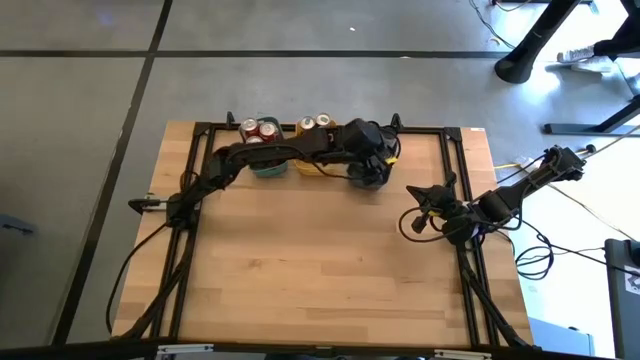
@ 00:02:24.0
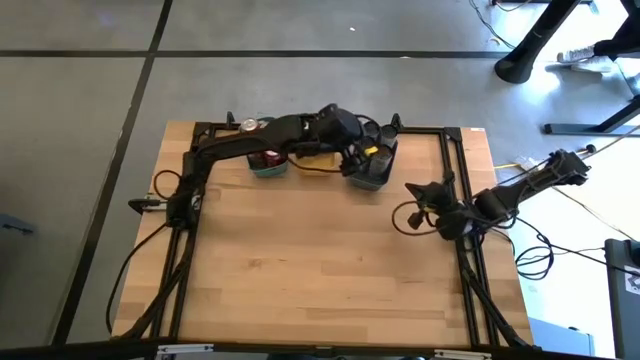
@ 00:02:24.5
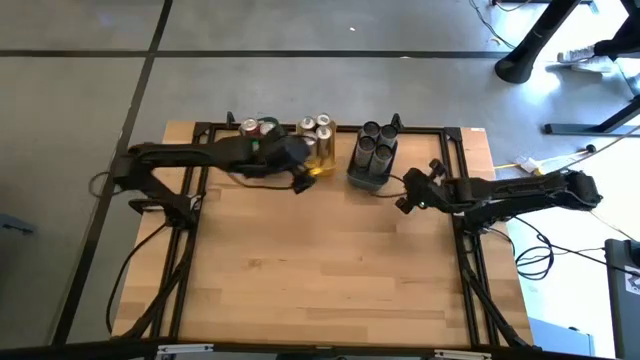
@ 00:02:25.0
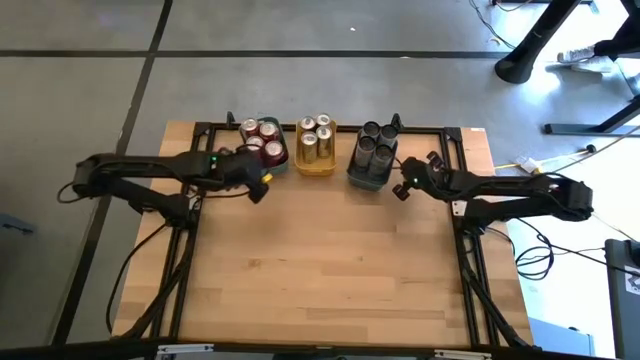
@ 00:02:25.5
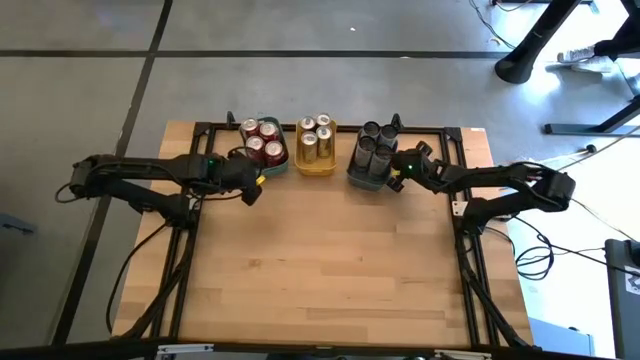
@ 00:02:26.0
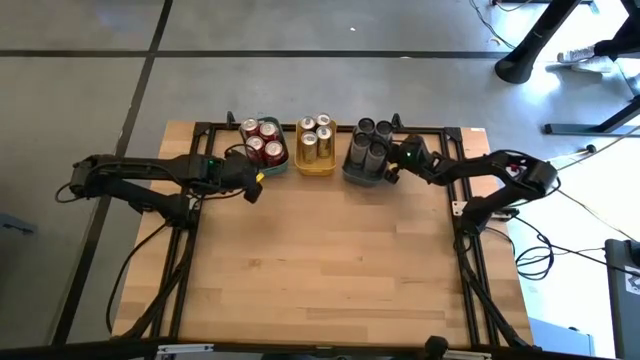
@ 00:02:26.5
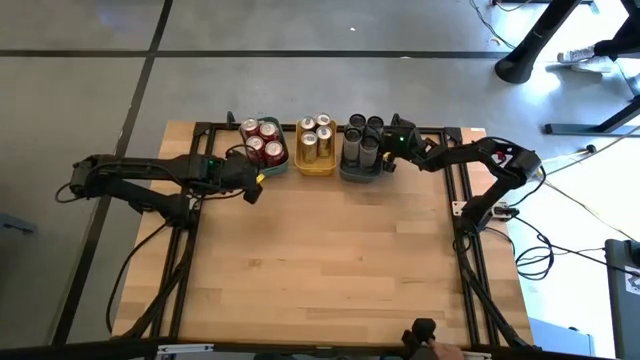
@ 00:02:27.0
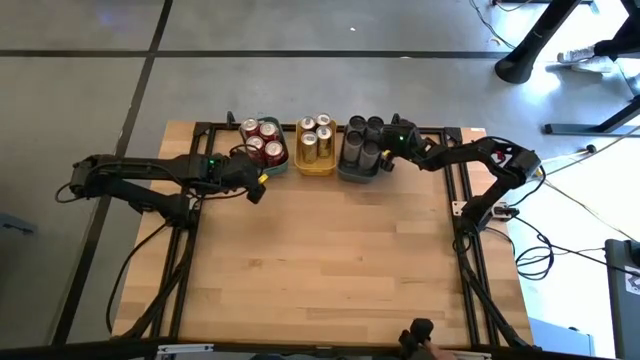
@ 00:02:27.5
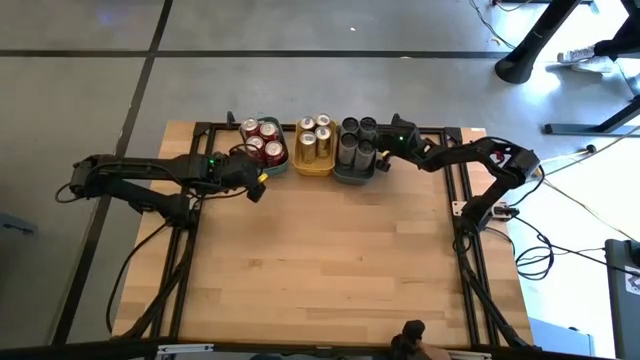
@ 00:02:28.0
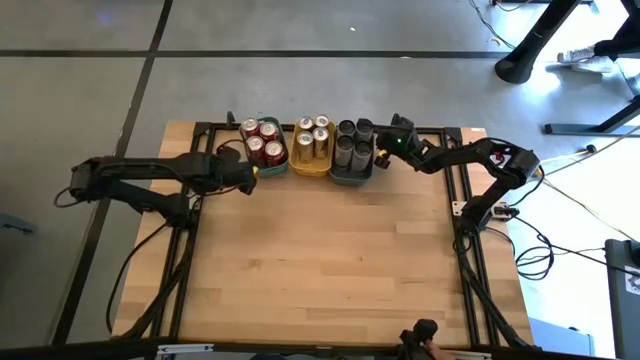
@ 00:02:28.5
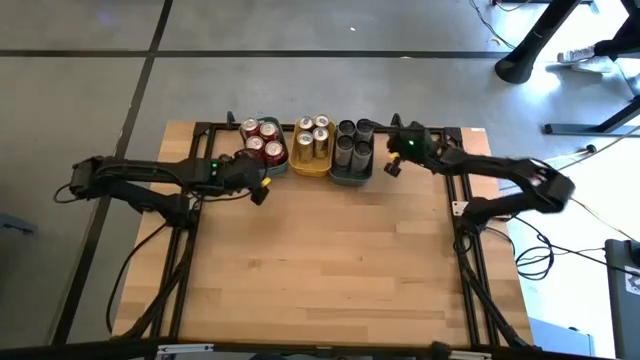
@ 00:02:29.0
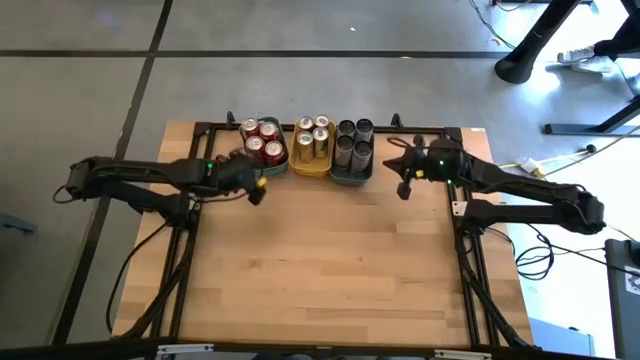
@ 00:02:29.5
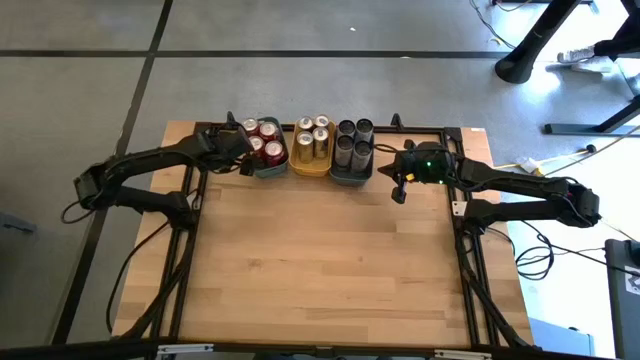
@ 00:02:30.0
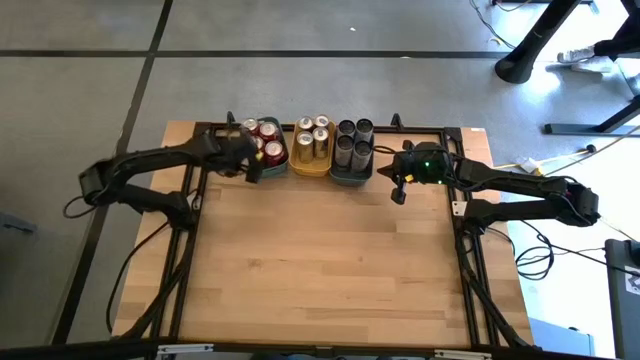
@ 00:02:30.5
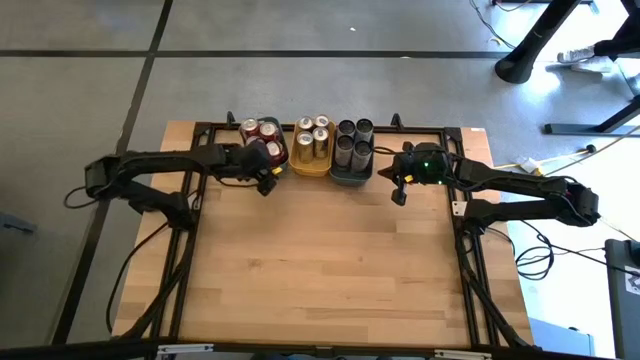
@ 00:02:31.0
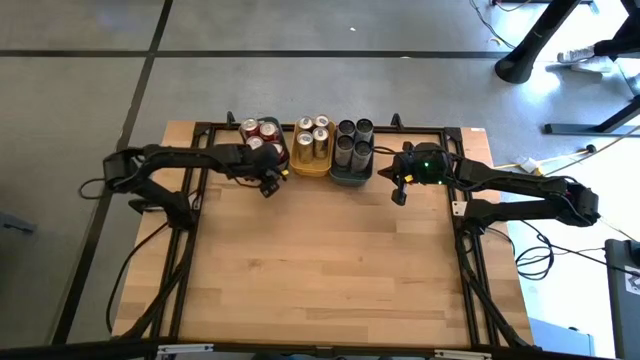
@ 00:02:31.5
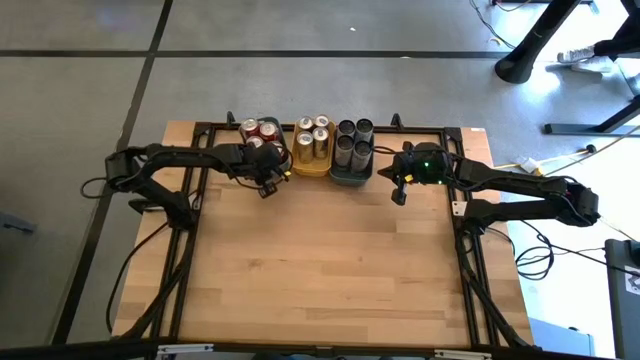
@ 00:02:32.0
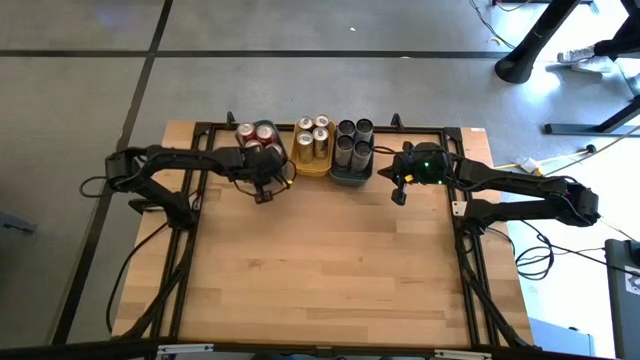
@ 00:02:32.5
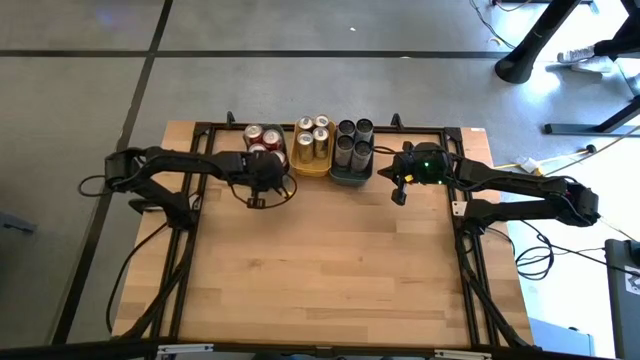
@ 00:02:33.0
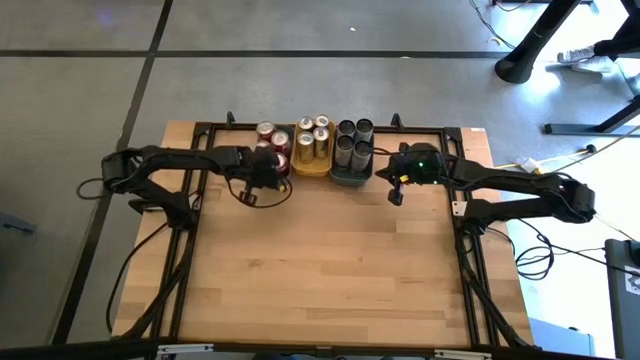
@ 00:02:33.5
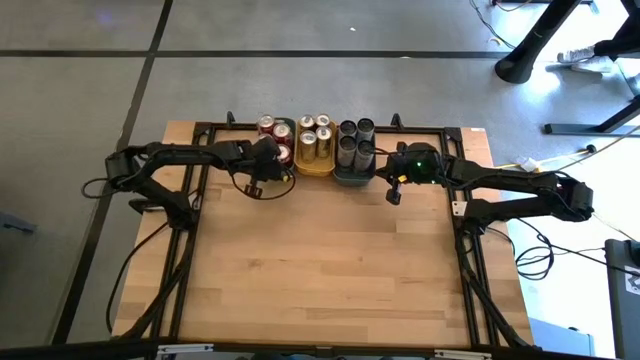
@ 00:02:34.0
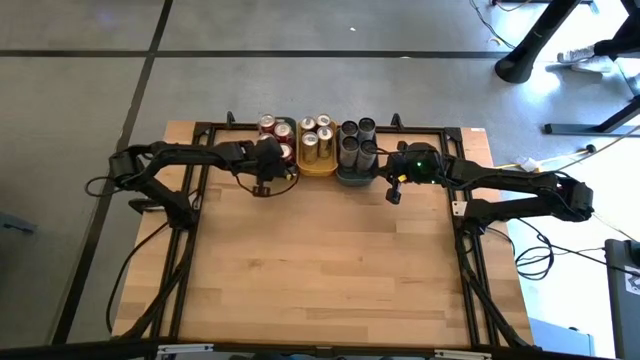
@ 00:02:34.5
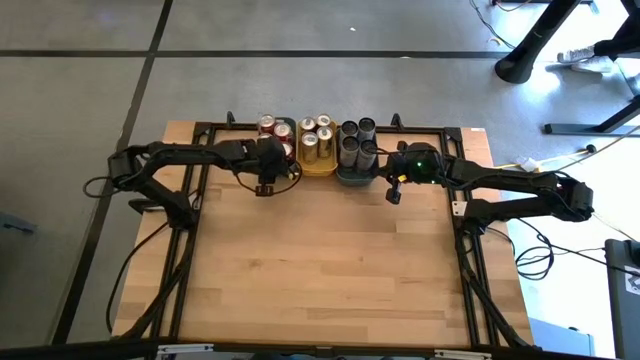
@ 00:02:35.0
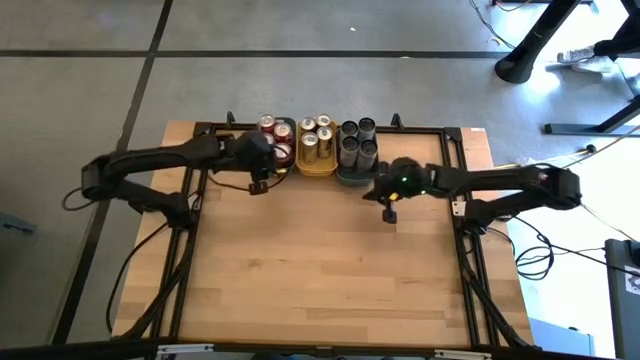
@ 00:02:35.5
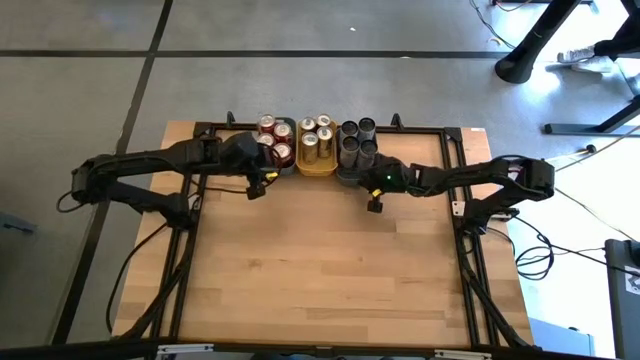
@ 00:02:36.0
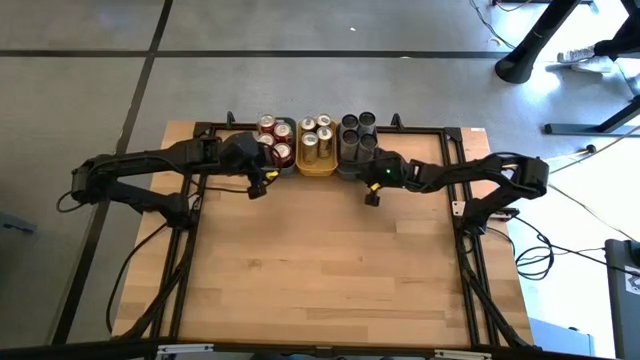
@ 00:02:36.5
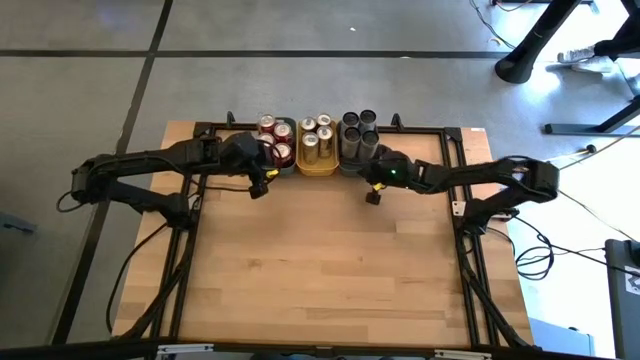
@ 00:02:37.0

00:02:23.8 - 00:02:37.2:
Task: Sort soda cans
Adjust the bins

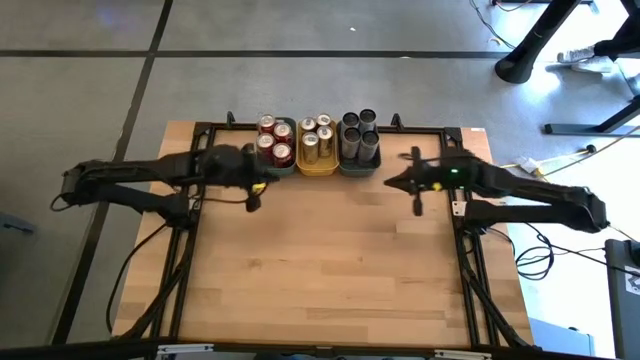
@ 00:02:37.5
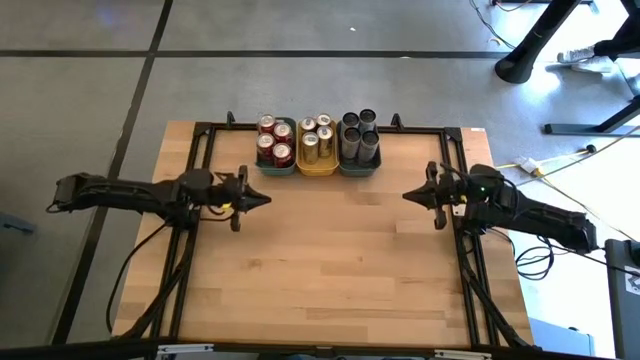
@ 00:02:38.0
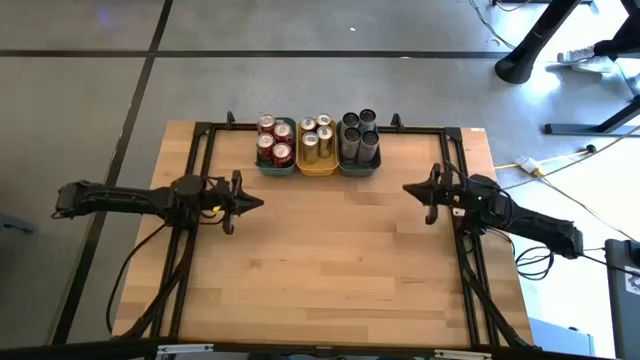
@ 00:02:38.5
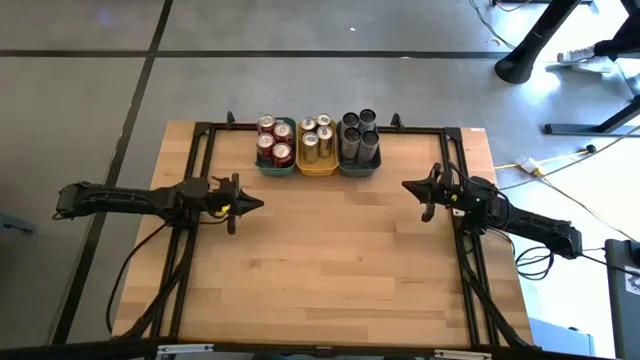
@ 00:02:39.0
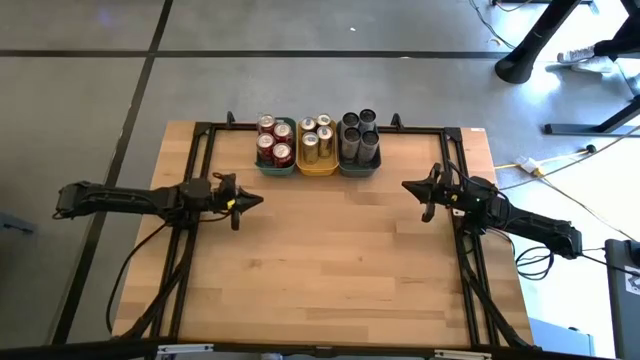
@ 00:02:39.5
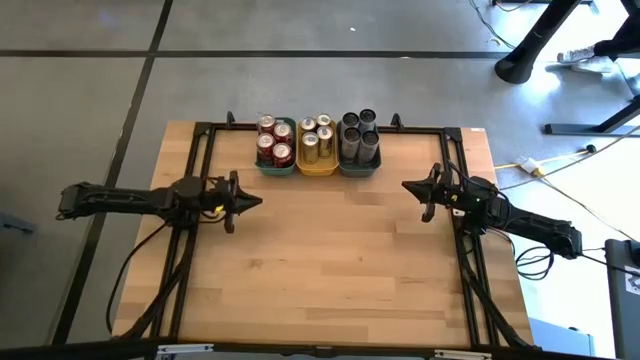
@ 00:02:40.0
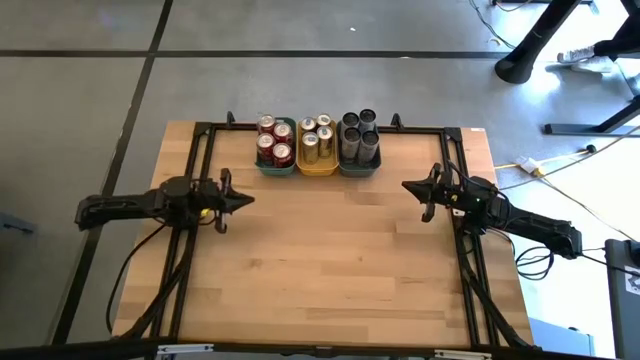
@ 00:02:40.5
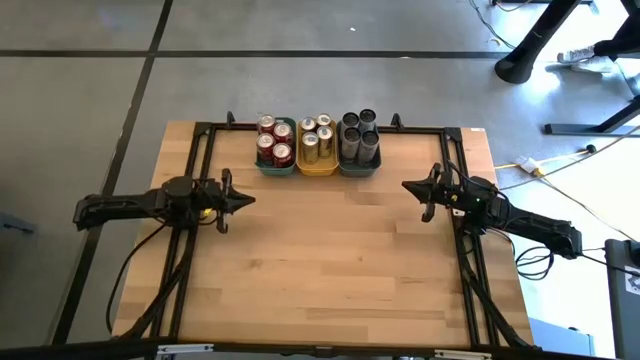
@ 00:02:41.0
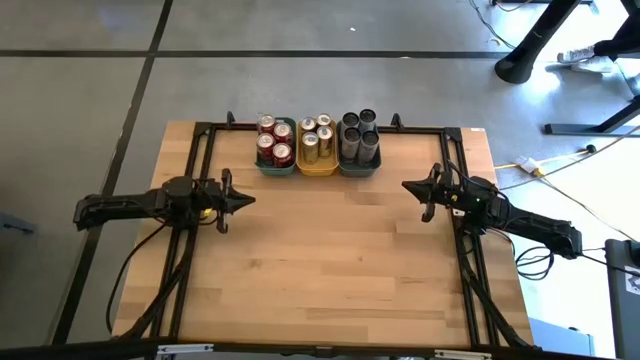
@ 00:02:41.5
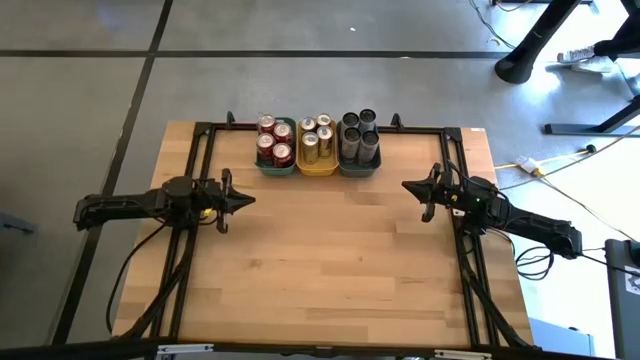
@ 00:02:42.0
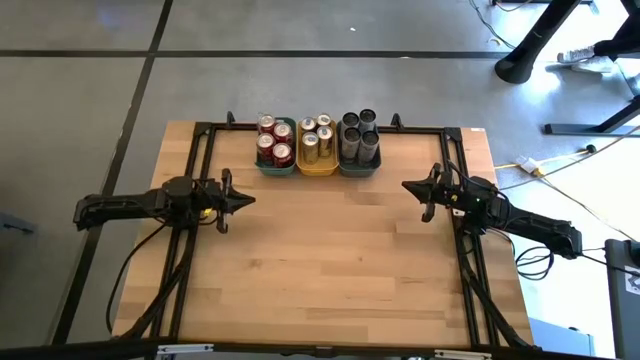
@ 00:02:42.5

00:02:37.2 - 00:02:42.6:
Return to Home Position
